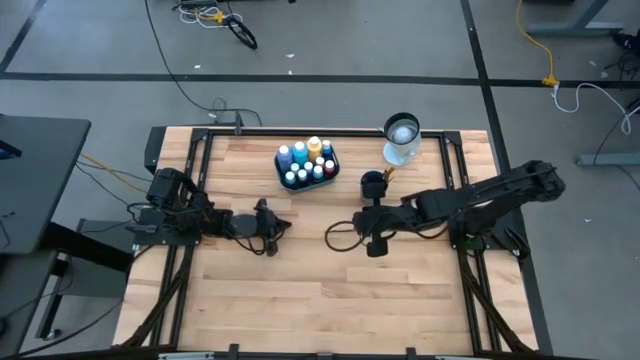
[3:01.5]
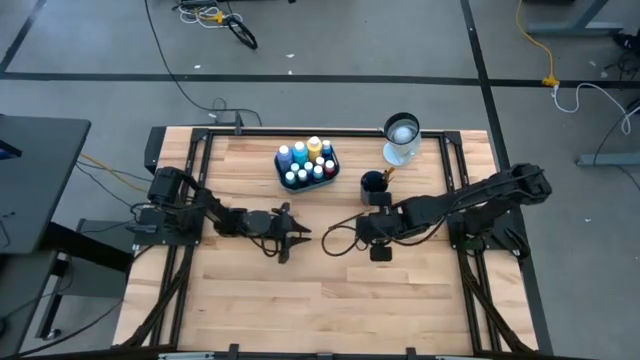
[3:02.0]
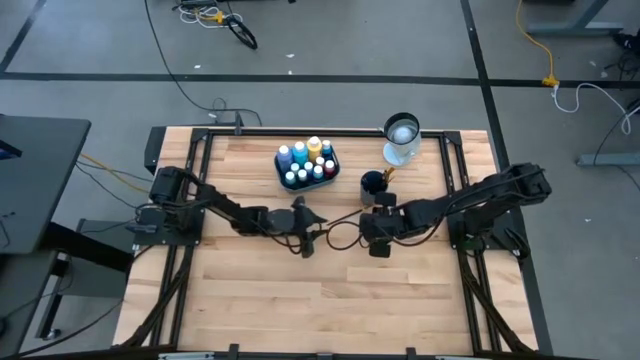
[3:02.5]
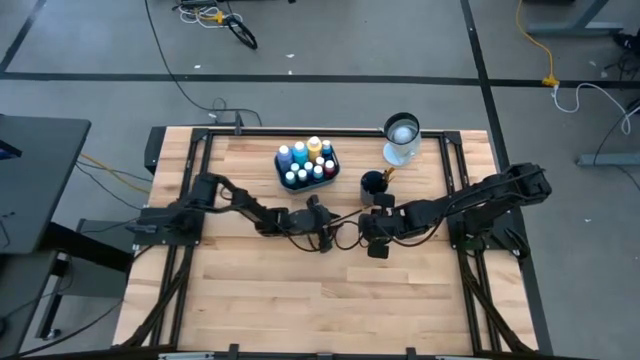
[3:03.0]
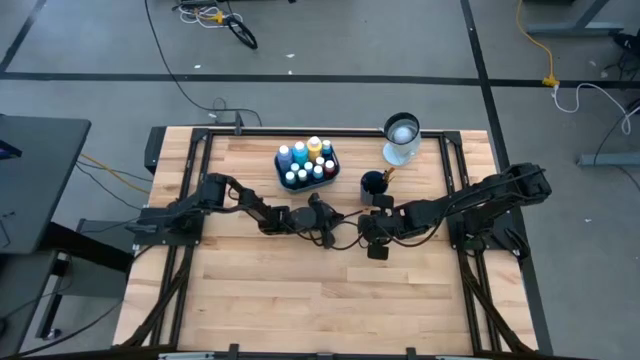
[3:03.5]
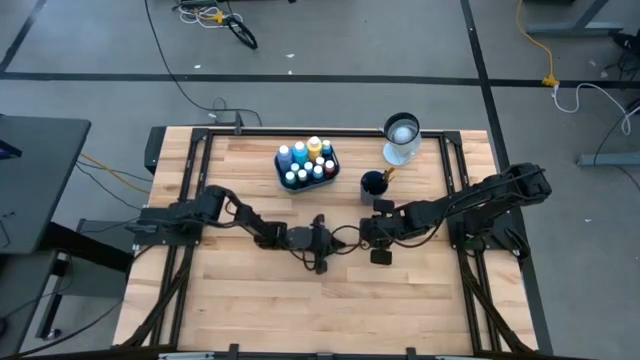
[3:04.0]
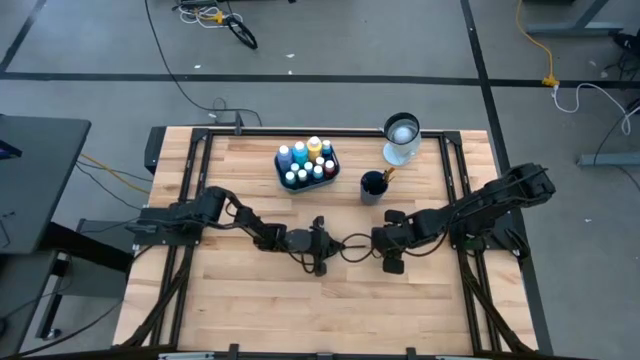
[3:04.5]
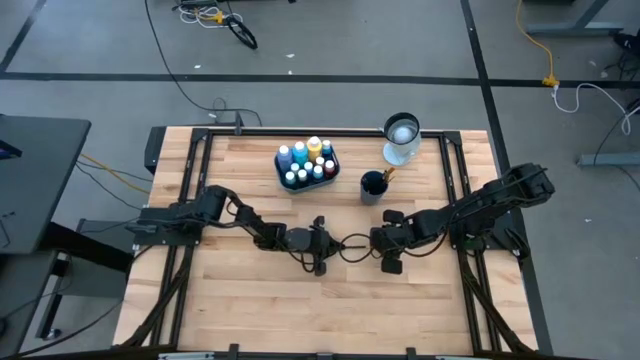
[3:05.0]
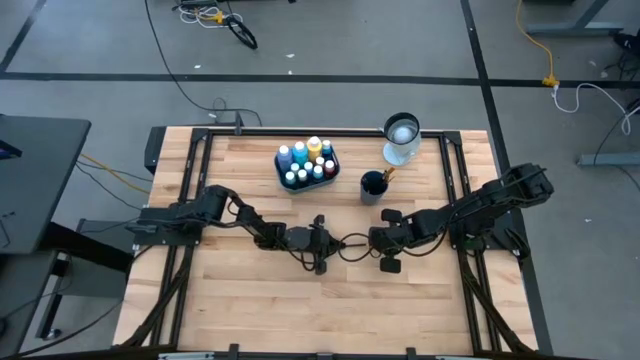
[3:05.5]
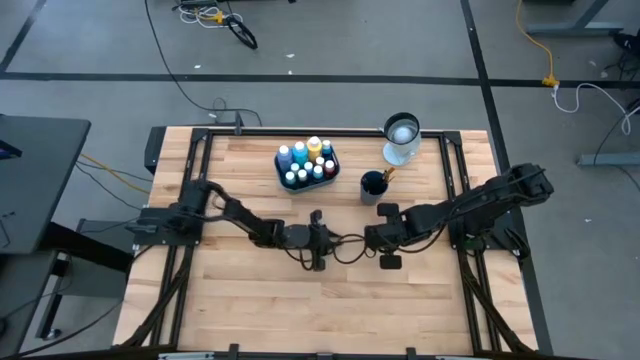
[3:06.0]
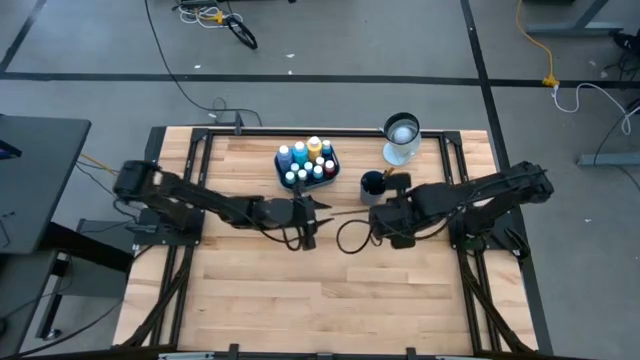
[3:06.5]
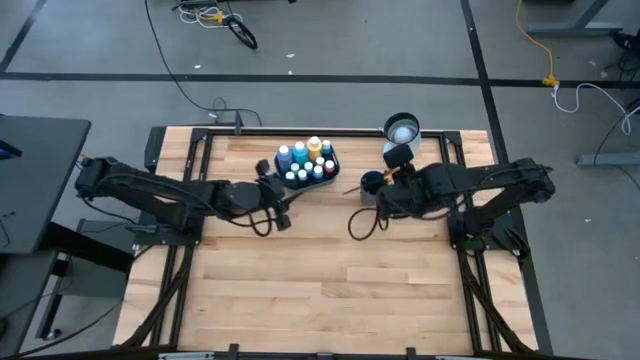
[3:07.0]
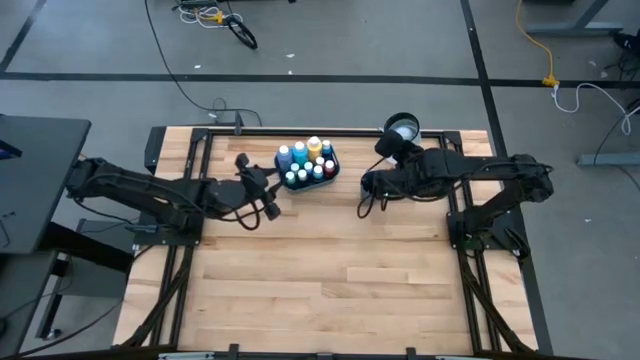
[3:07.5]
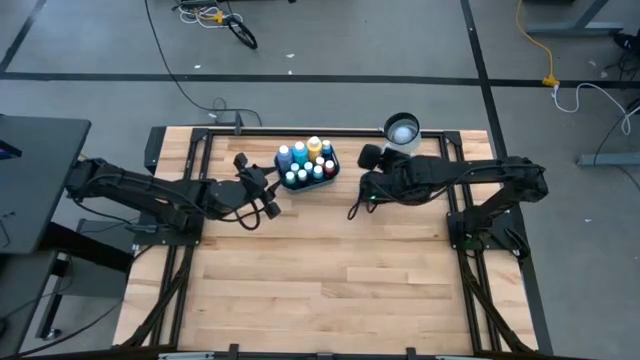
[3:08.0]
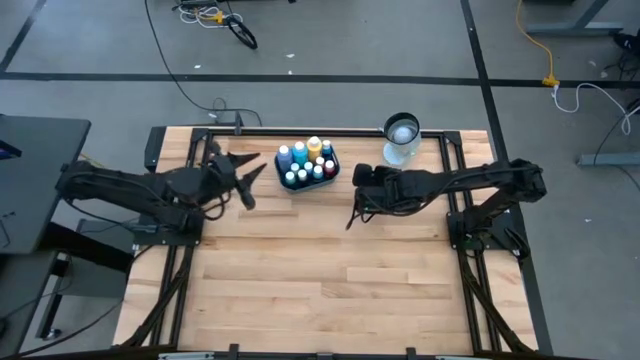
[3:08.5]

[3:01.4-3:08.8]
Task: Pick & Place Paint Supplies
Put the gold paint brush into the blue cup

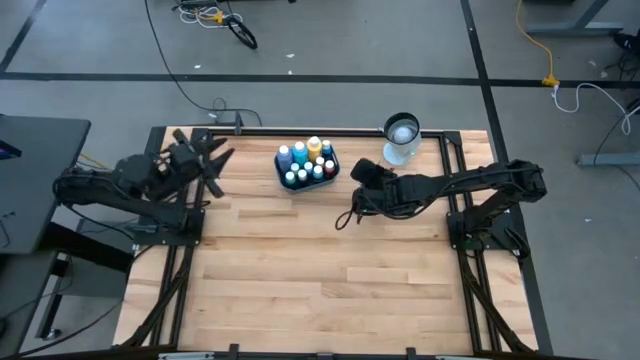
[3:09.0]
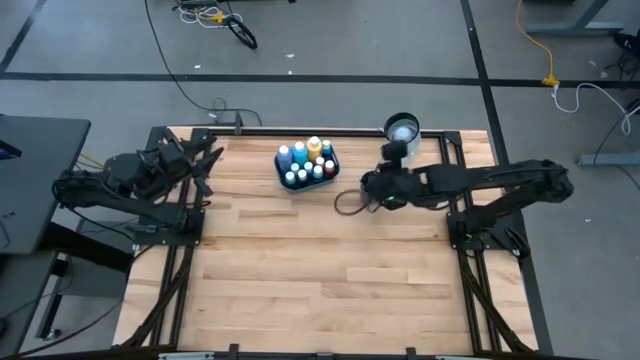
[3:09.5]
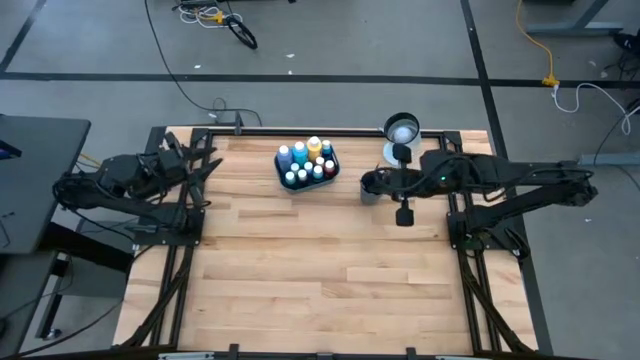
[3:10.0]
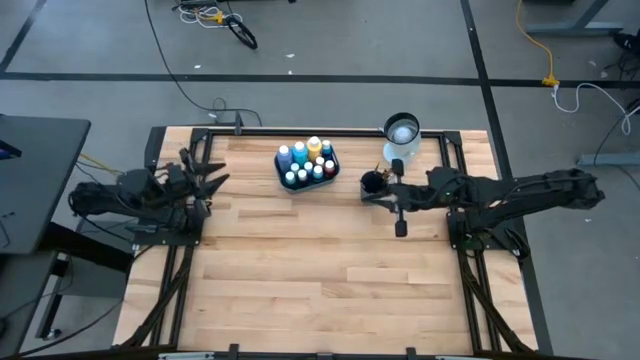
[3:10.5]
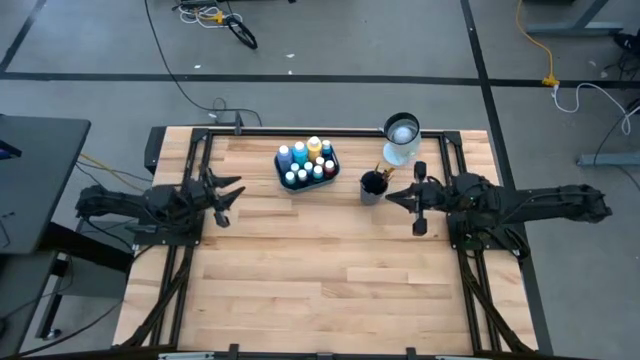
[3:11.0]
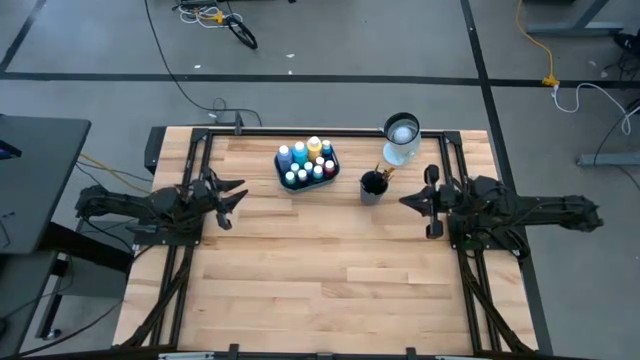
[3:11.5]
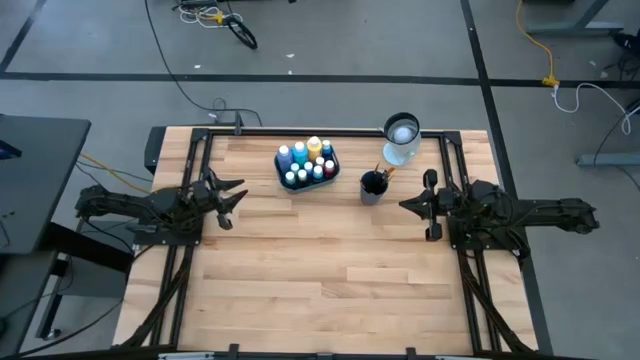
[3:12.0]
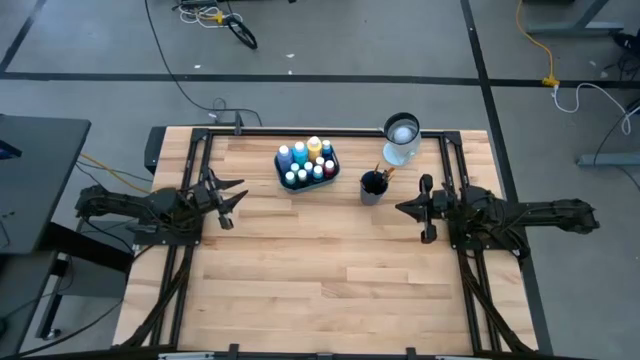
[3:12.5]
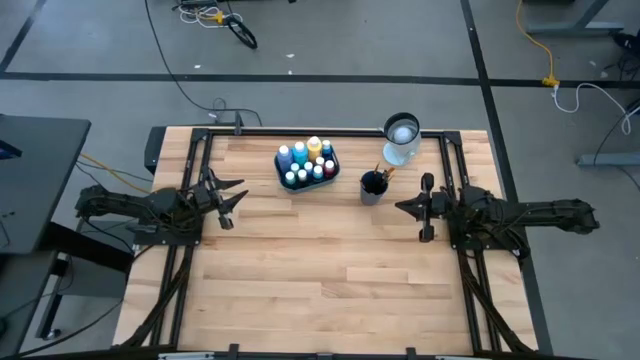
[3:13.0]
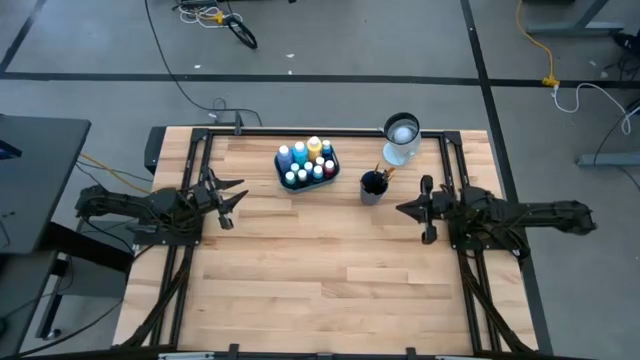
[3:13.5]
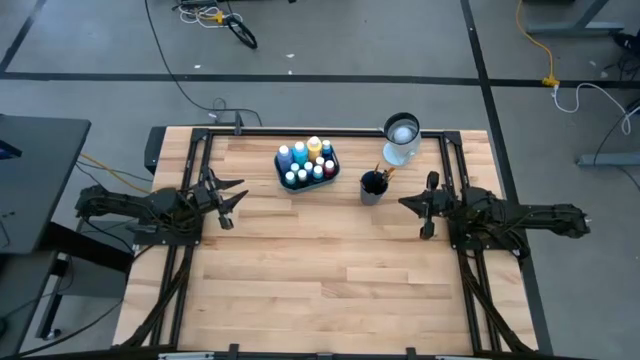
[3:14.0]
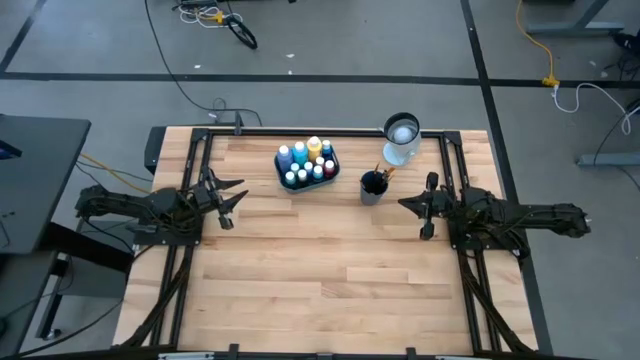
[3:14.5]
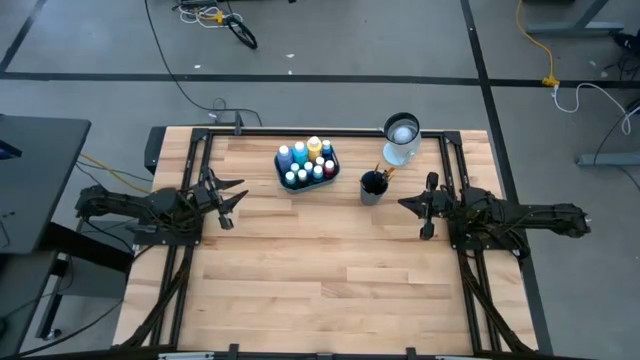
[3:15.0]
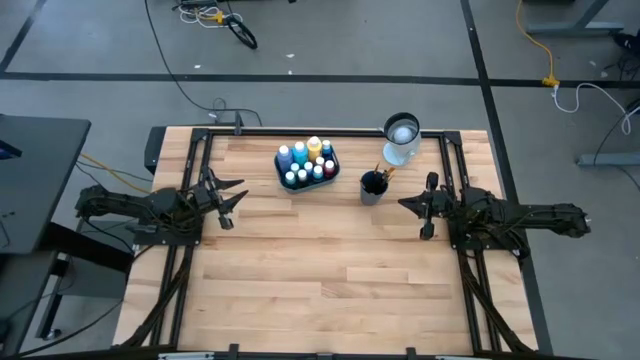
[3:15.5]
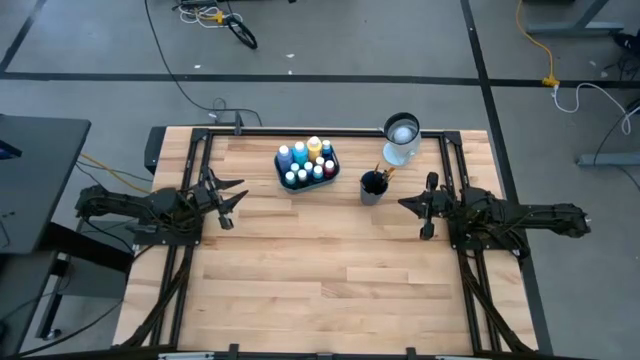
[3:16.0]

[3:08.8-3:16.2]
Return to Home Position

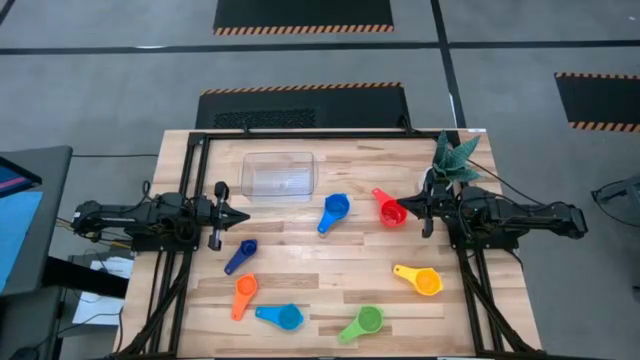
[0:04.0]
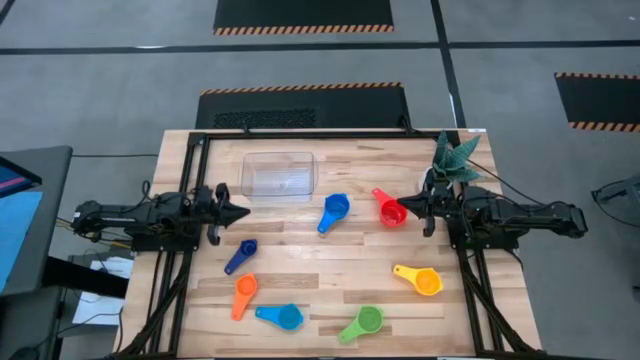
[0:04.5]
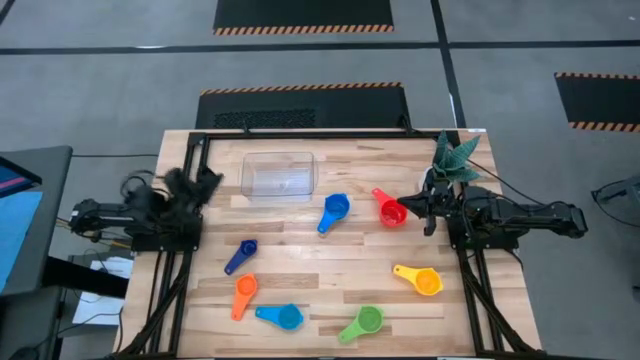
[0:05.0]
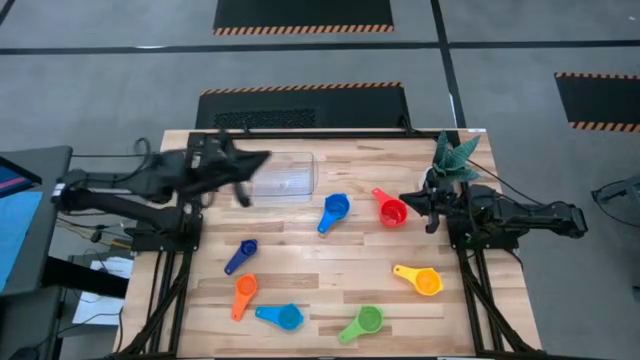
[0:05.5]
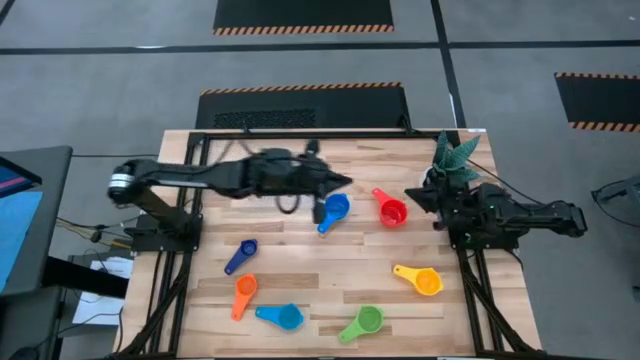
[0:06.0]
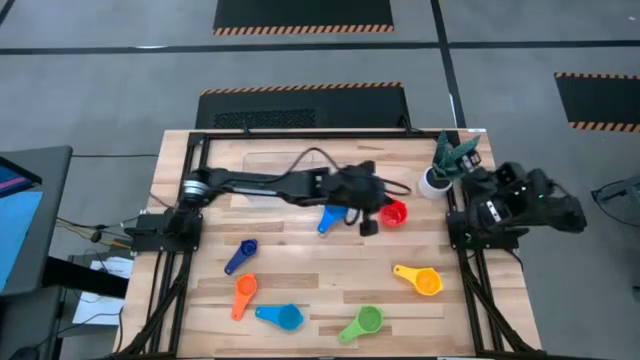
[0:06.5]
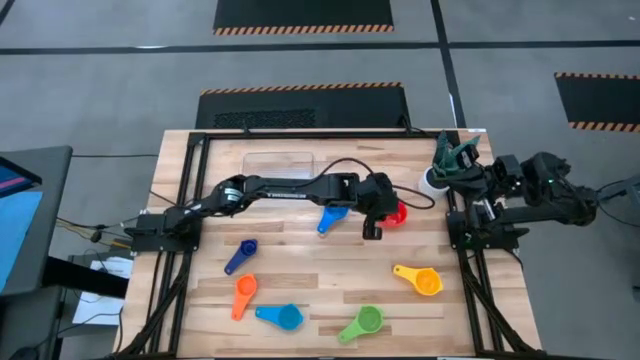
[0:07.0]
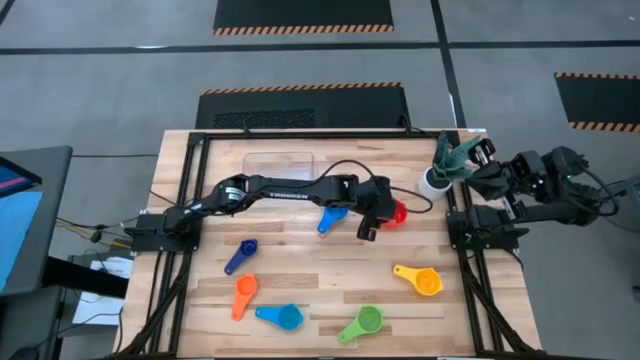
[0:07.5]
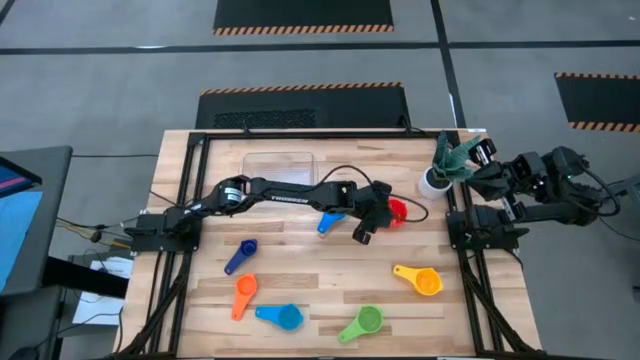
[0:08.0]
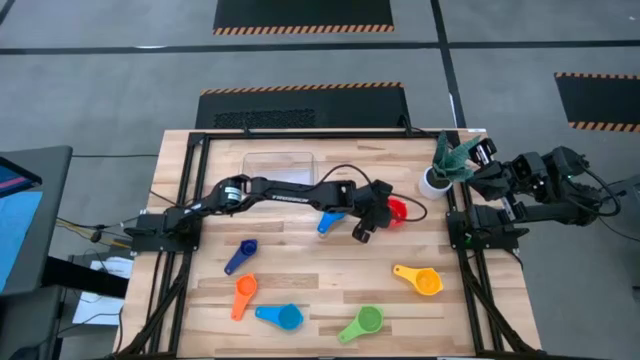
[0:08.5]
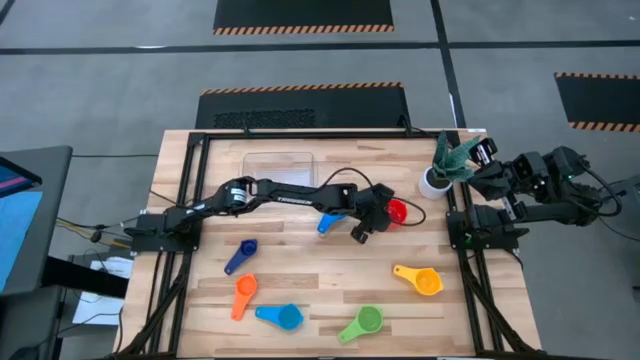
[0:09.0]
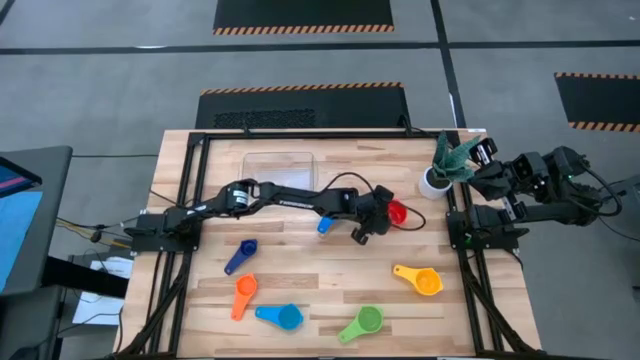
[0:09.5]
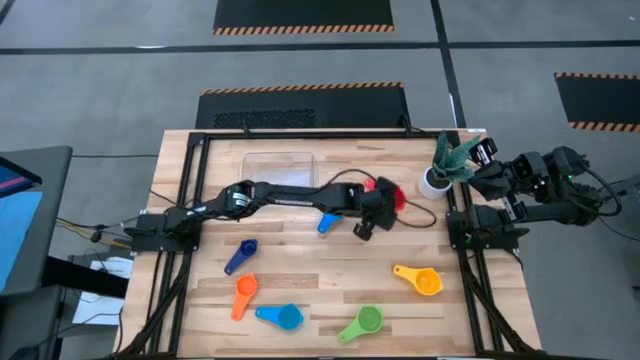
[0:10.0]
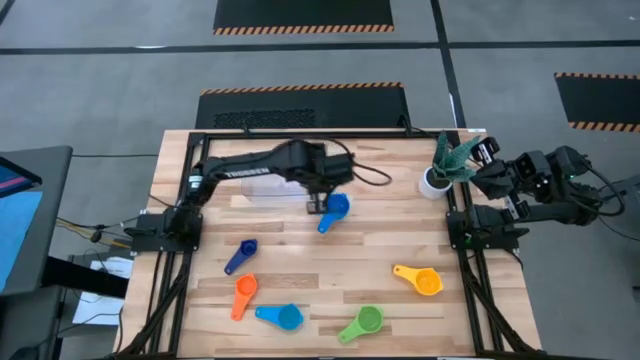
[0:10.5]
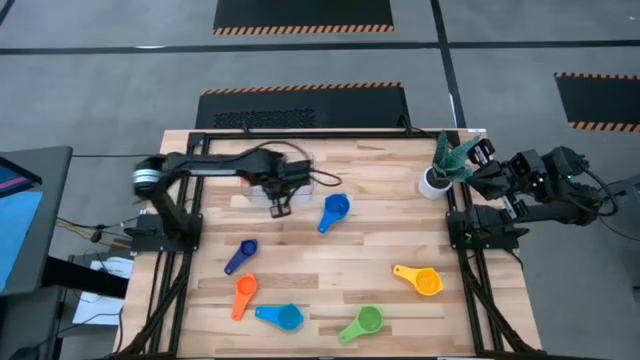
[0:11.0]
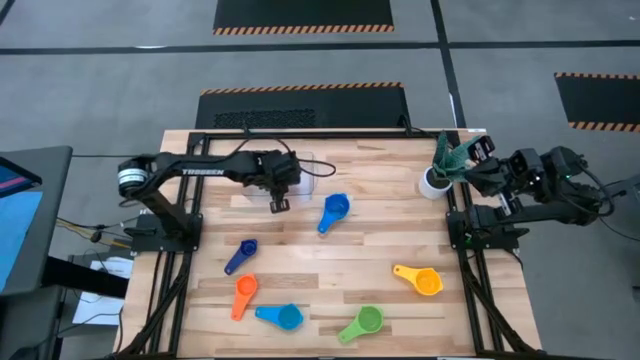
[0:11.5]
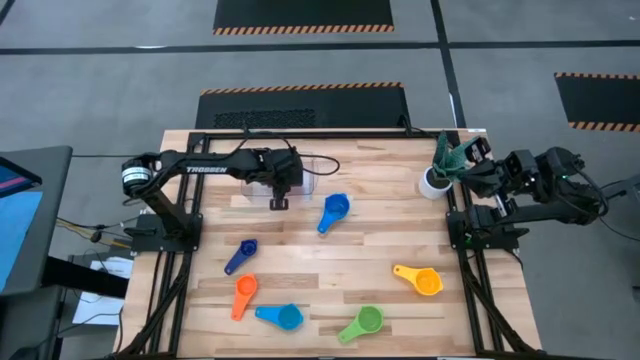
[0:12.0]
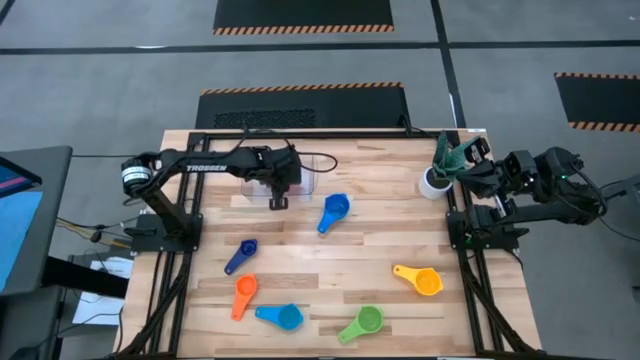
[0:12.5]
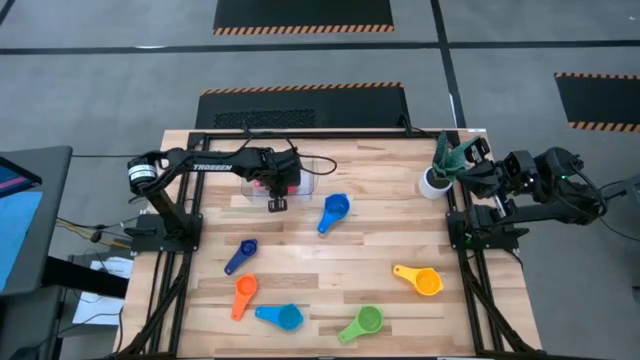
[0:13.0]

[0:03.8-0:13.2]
Task: Nest measuring cups in basket
Put the red nest measuring cup into the transparent bin
